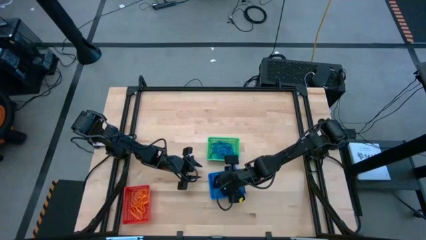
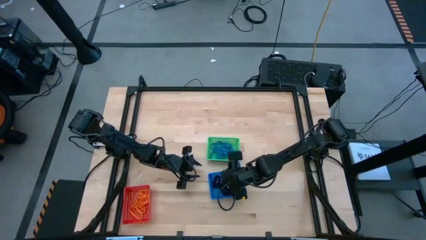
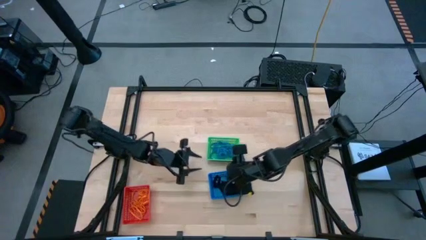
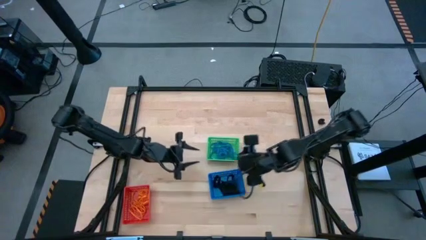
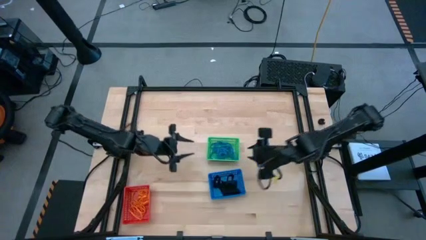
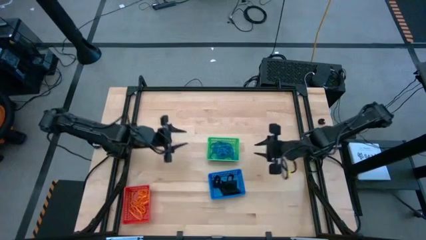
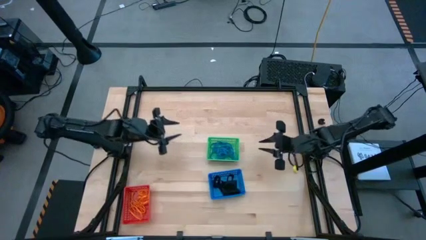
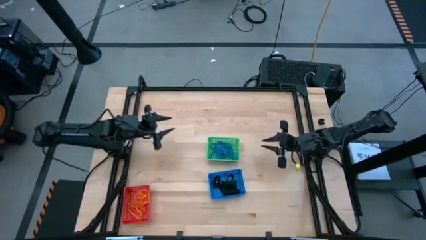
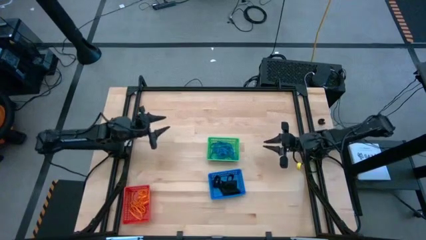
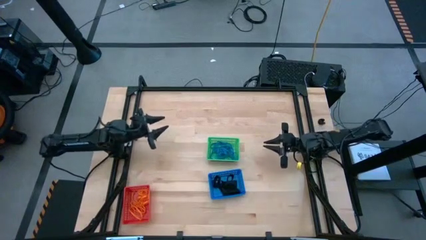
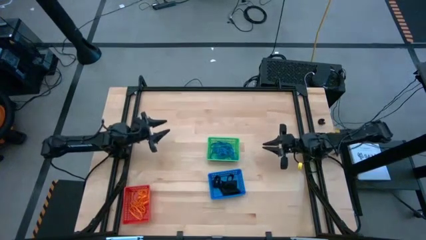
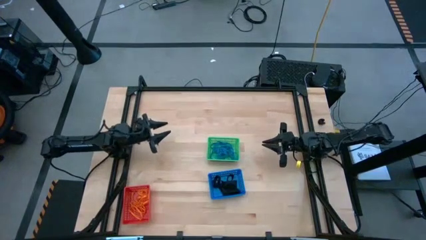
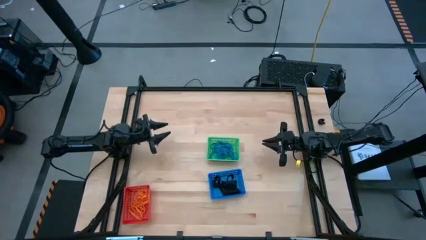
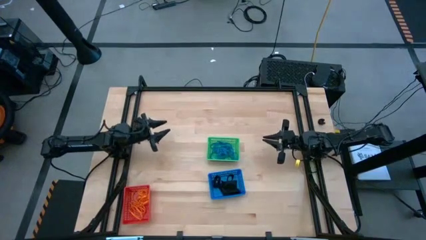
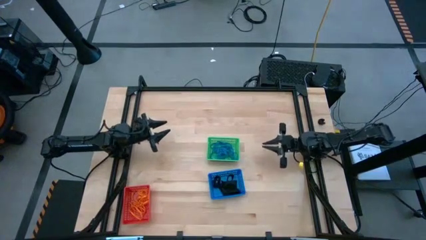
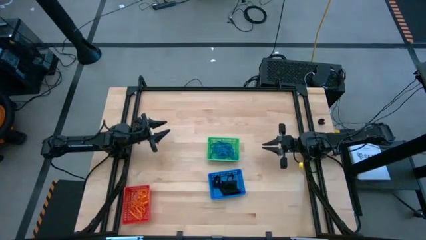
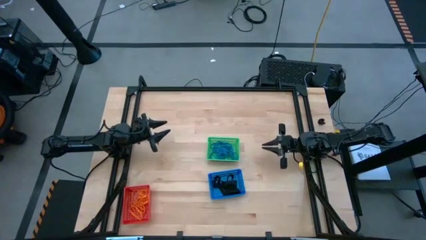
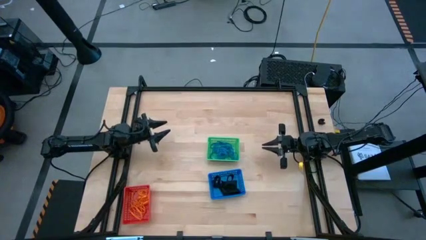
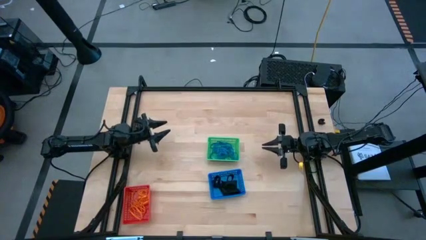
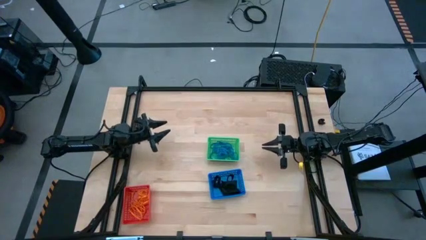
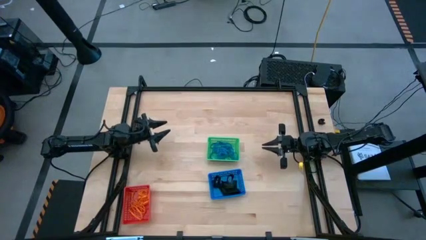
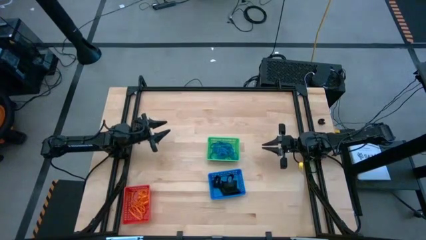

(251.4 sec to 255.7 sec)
Task: Sort rubber bands into baskets
Return to Home Position

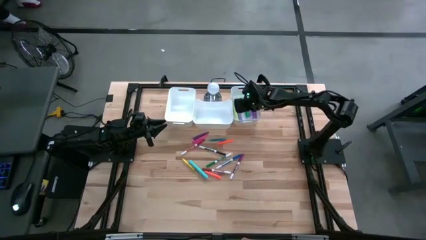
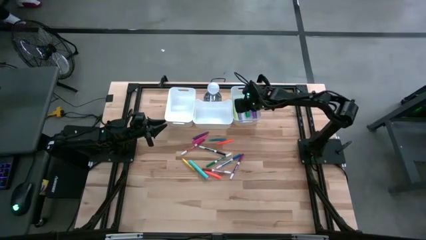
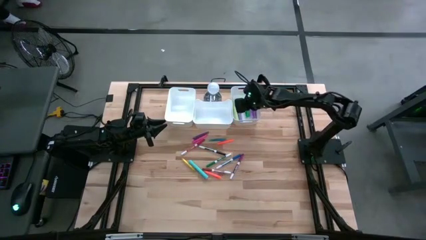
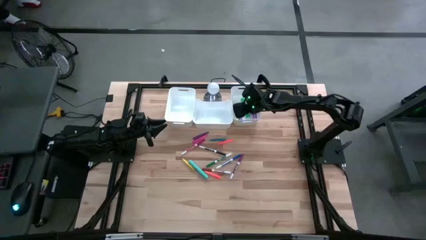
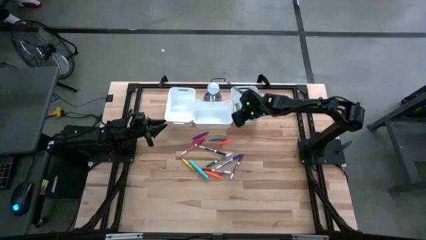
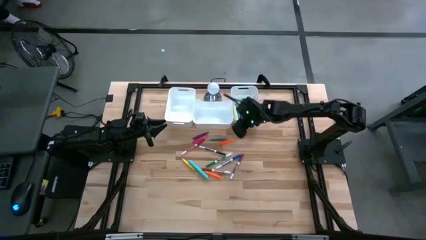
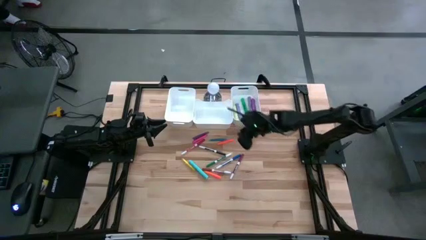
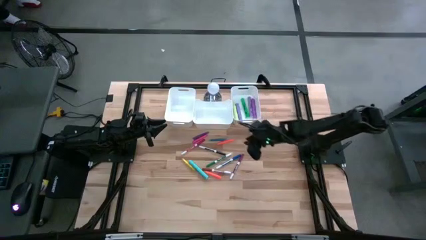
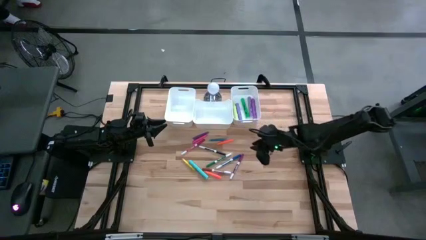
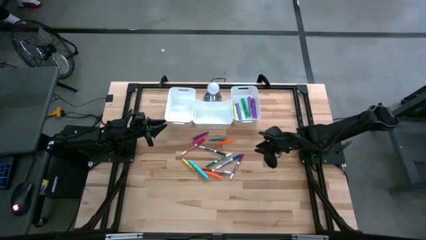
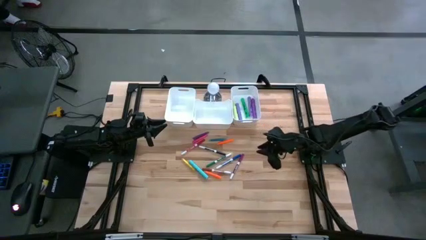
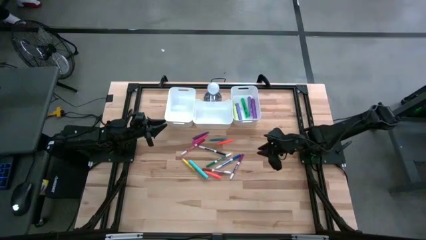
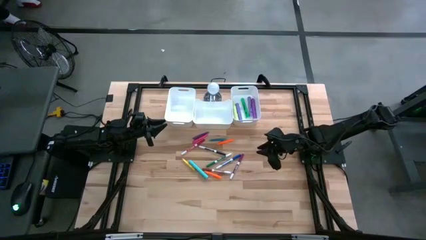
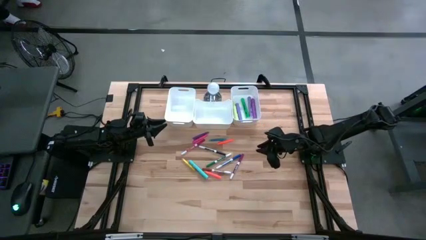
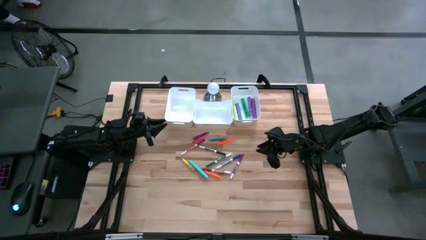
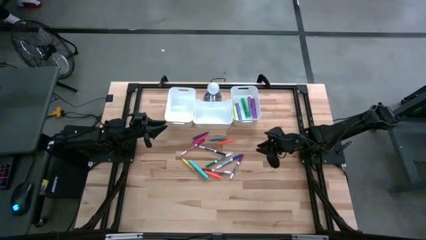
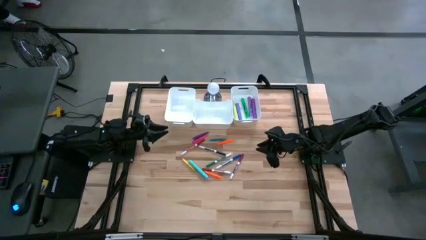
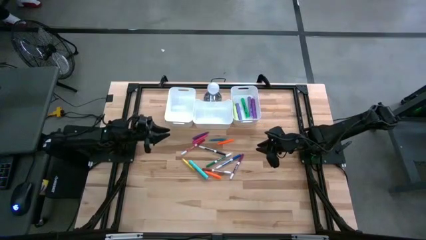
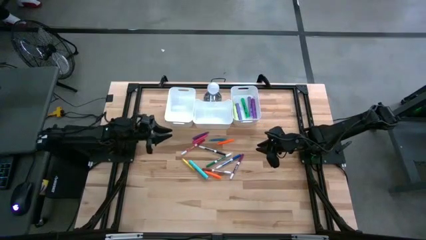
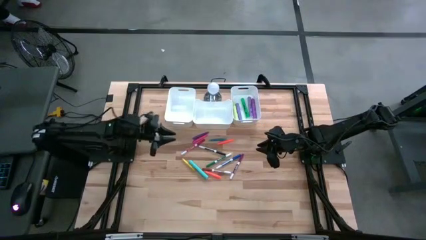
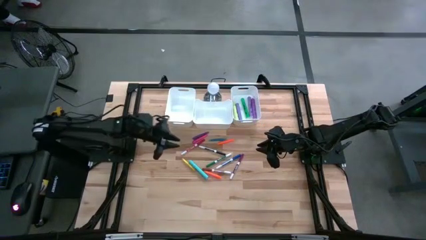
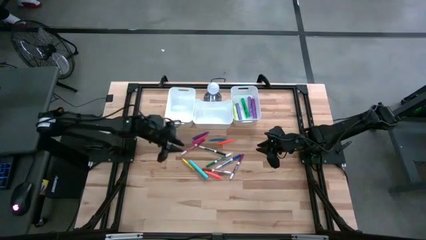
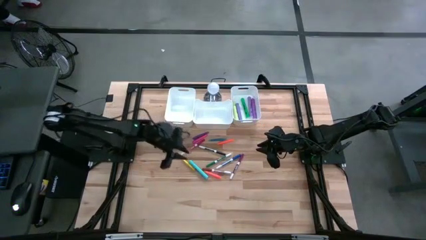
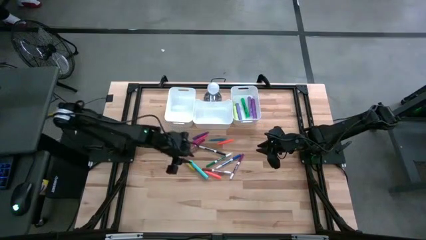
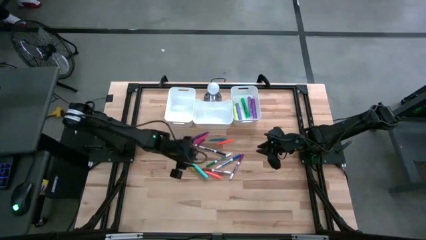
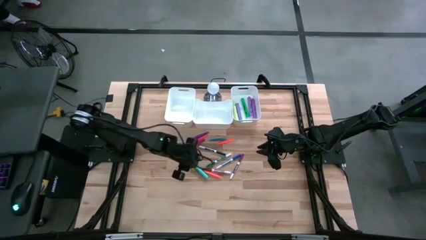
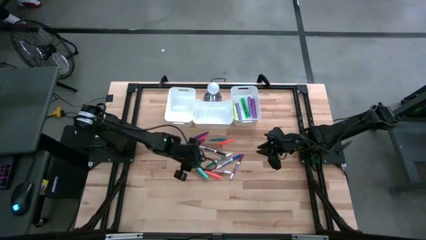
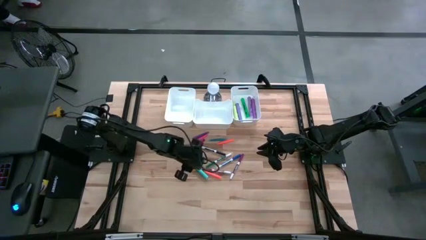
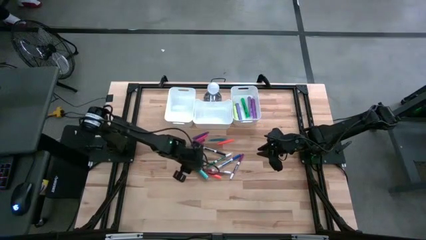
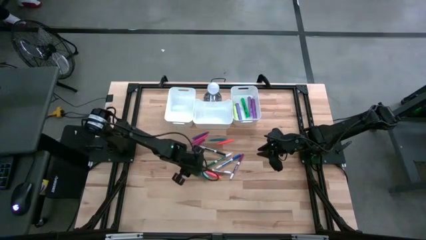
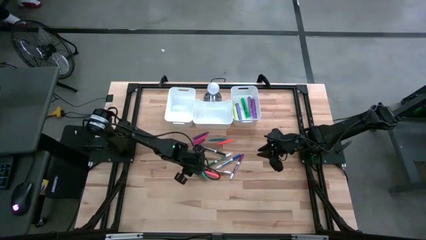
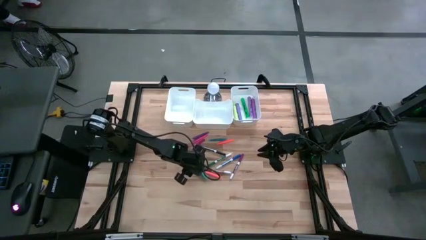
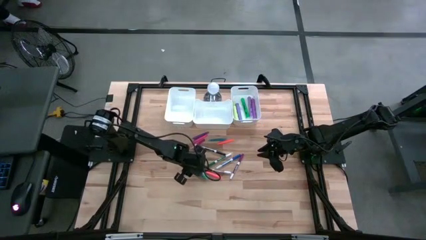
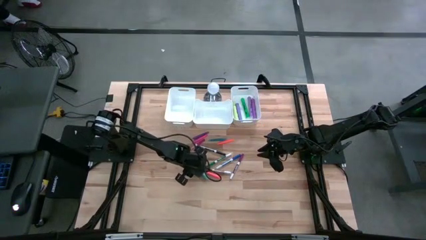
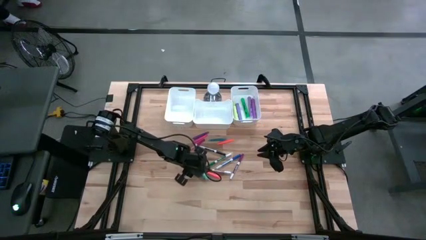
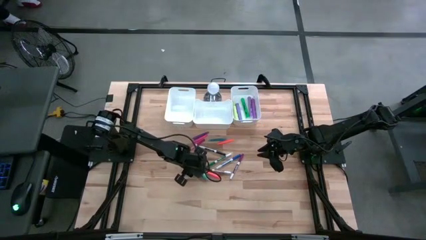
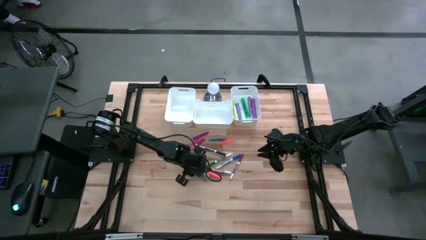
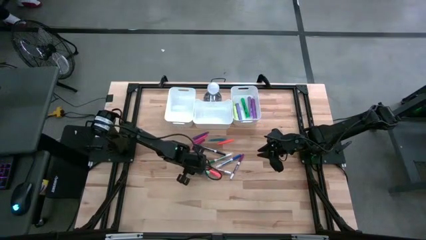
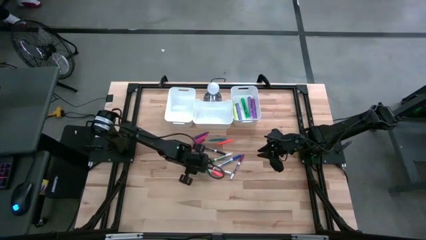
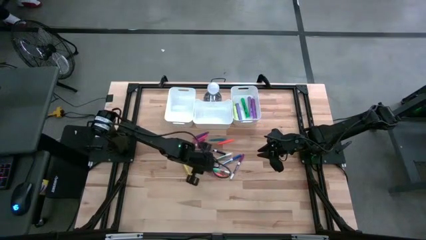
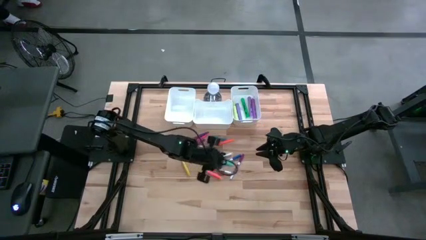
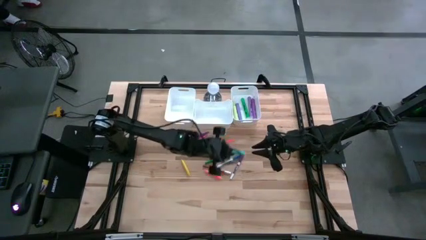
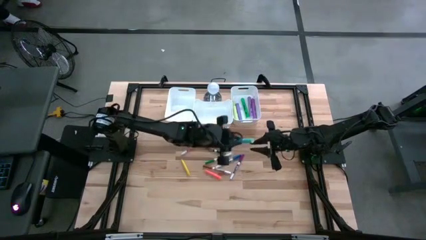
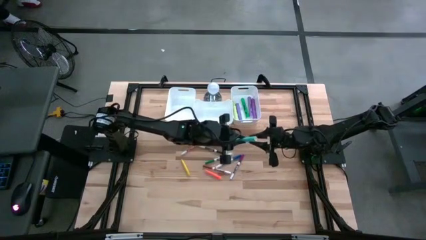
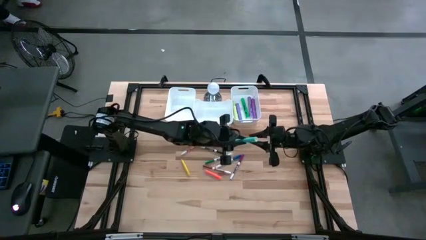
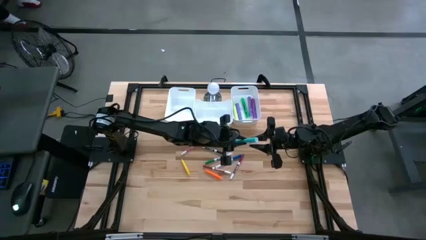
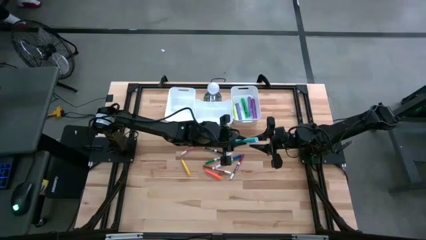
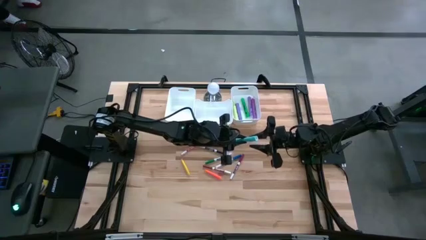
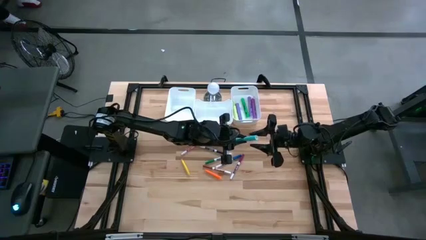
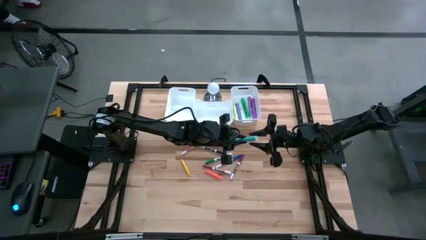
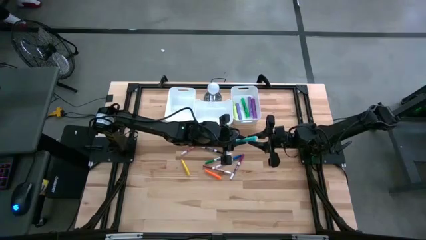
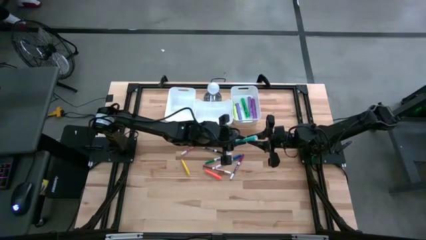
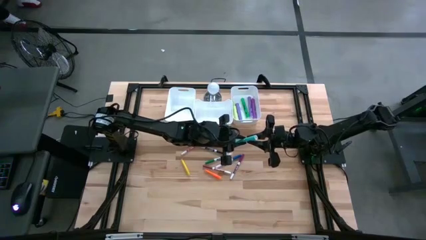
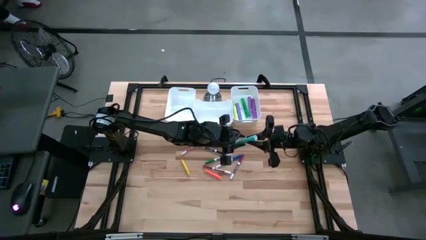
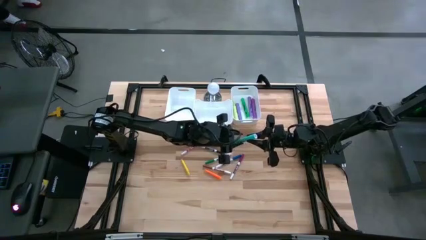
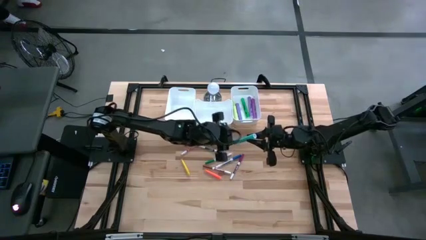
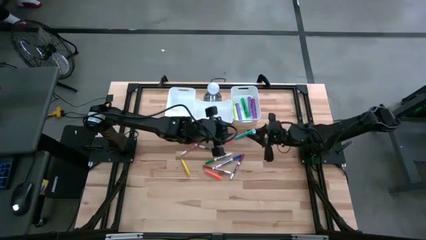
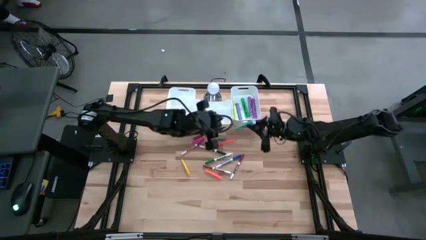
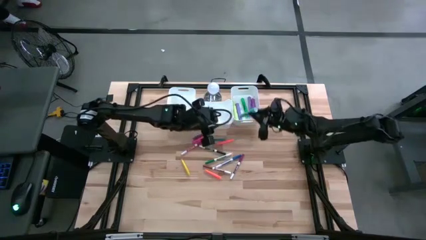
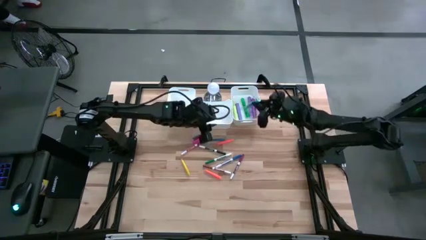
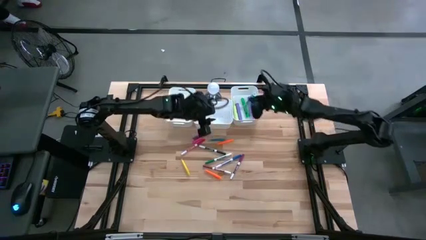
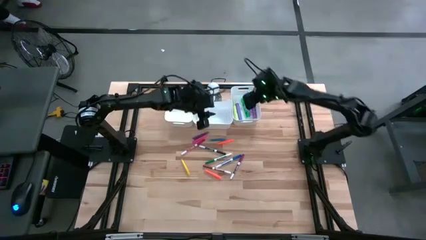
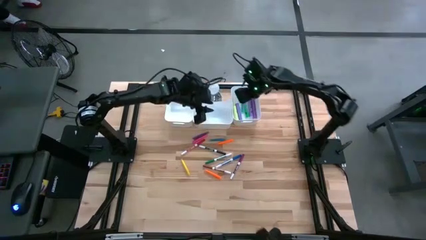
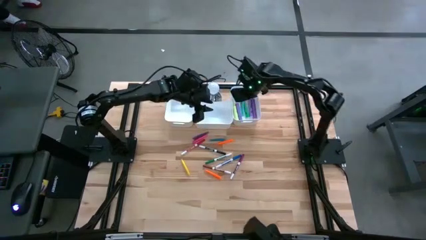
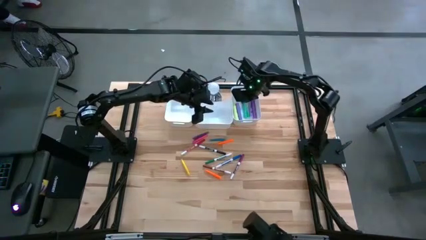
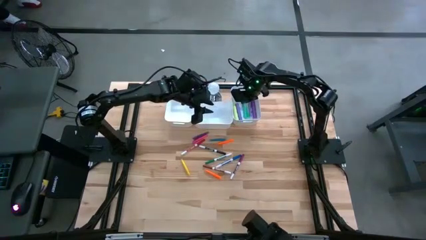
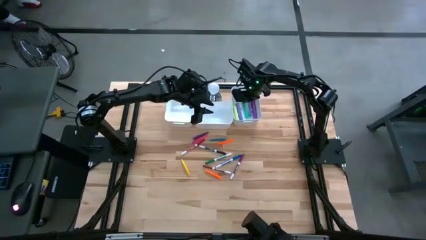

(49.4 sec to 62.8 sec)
Task: Pick & Place Markers
Put the blue highlighter pen into the right white bin
